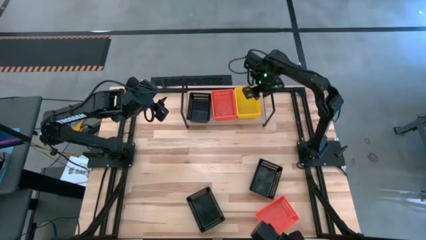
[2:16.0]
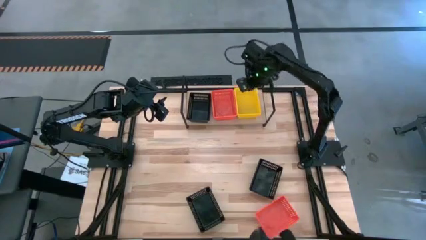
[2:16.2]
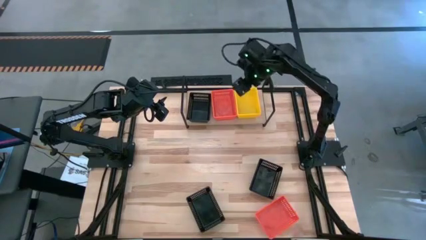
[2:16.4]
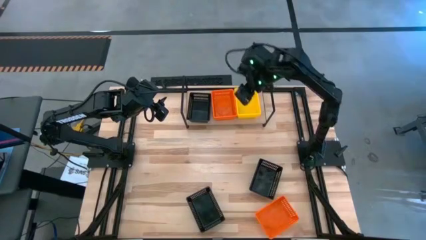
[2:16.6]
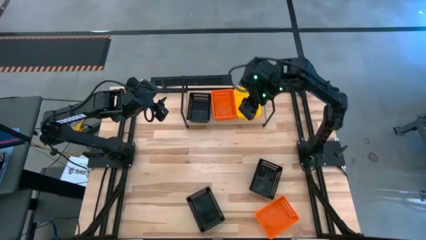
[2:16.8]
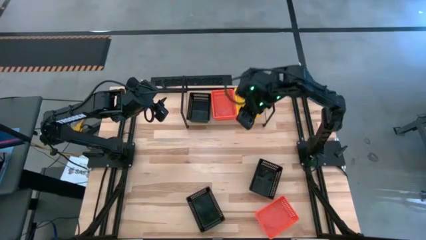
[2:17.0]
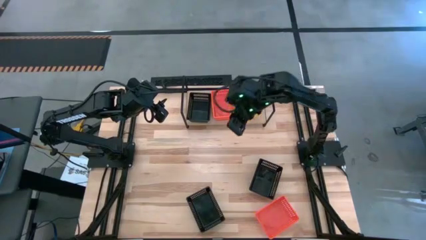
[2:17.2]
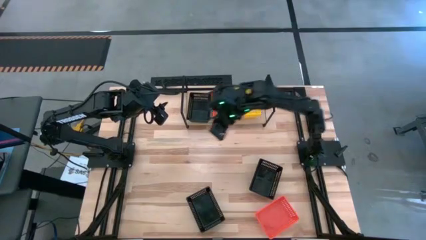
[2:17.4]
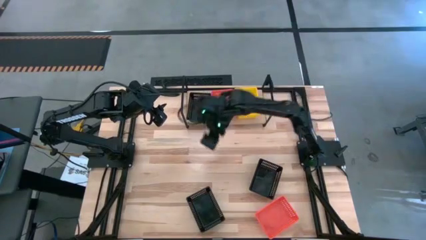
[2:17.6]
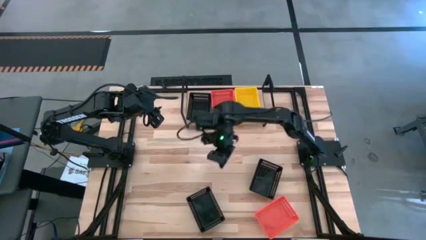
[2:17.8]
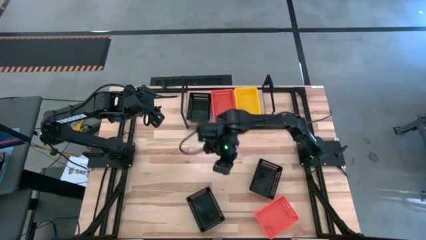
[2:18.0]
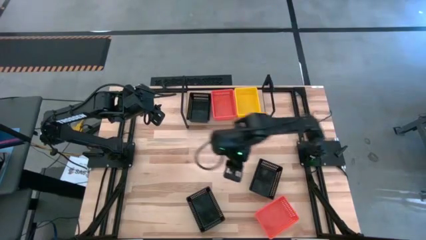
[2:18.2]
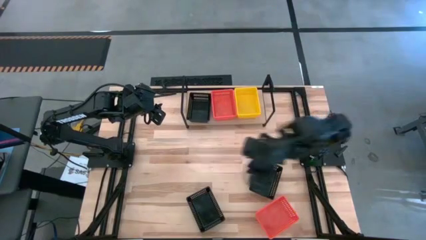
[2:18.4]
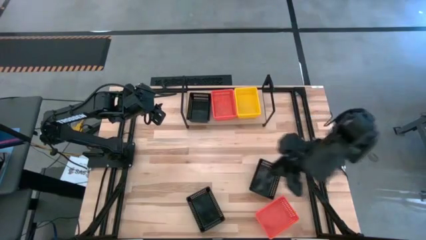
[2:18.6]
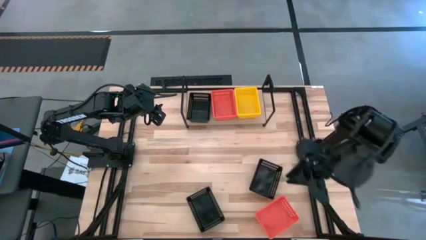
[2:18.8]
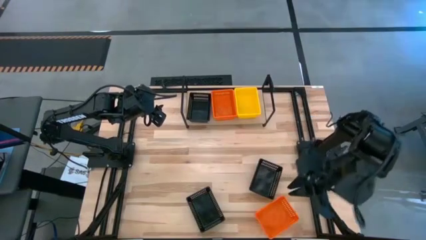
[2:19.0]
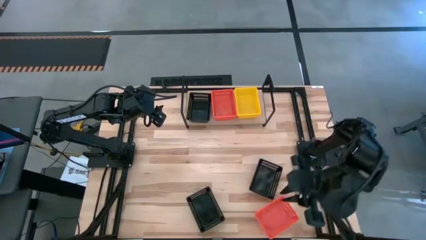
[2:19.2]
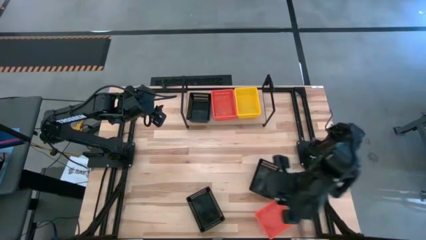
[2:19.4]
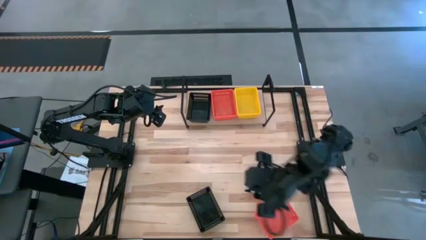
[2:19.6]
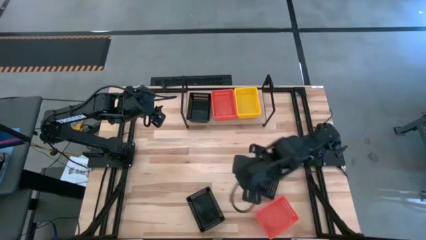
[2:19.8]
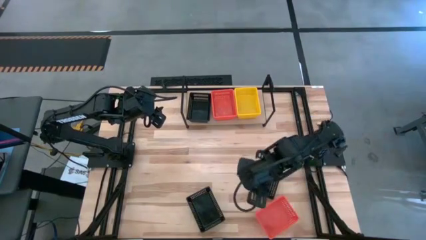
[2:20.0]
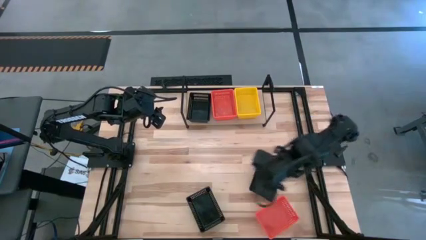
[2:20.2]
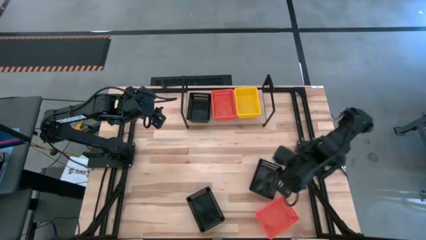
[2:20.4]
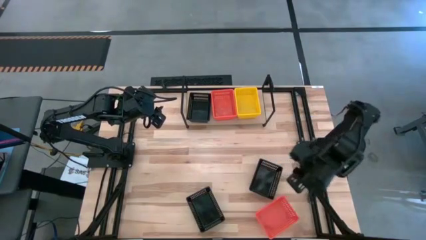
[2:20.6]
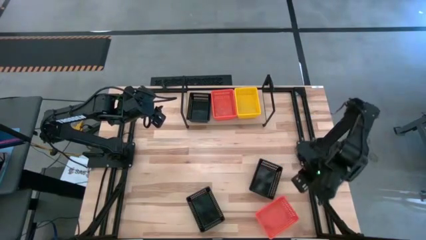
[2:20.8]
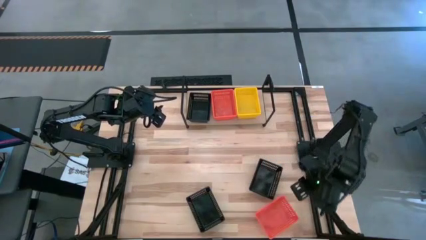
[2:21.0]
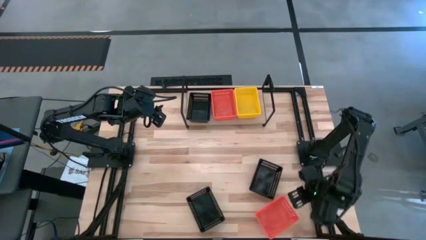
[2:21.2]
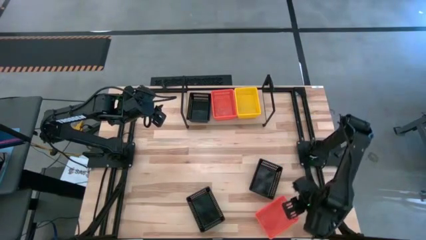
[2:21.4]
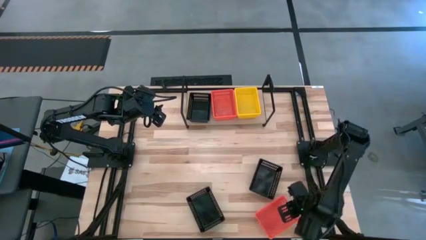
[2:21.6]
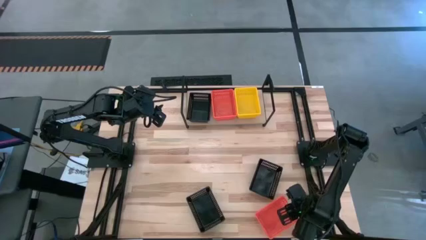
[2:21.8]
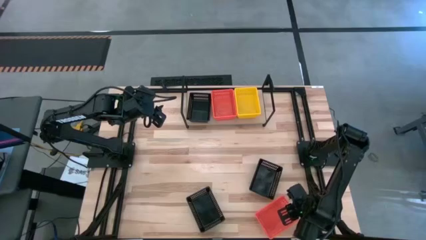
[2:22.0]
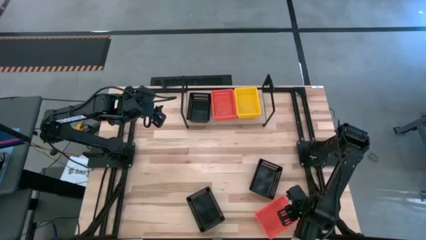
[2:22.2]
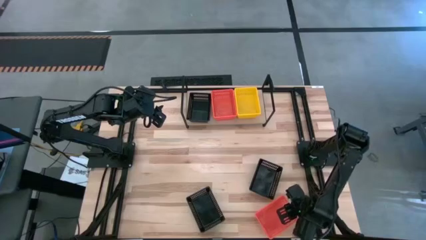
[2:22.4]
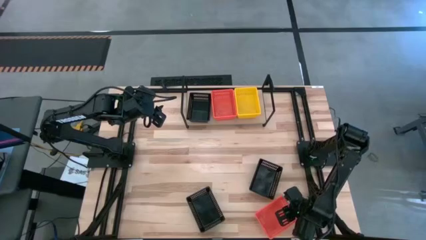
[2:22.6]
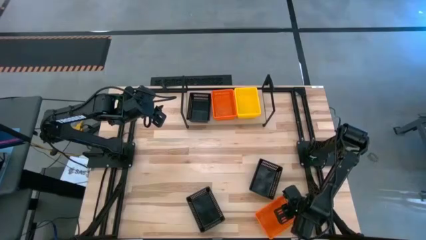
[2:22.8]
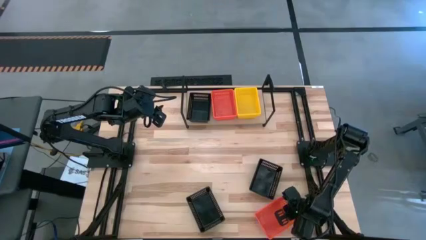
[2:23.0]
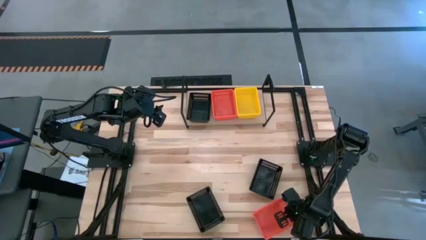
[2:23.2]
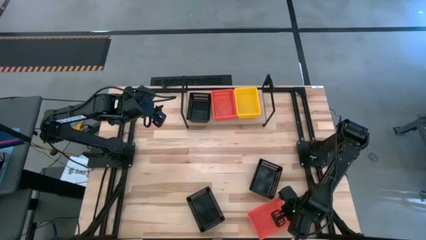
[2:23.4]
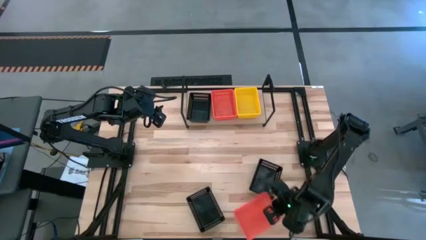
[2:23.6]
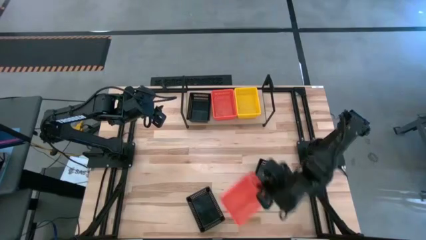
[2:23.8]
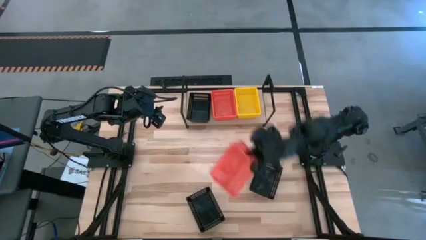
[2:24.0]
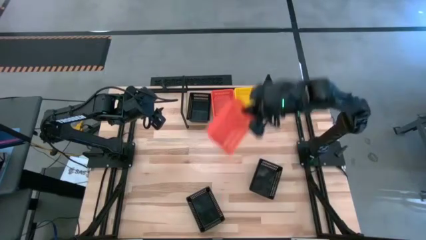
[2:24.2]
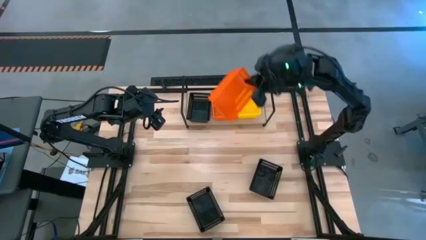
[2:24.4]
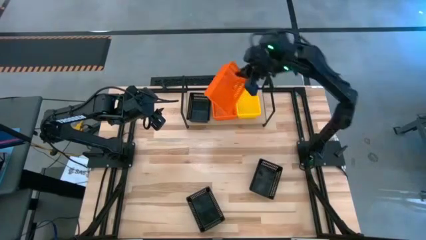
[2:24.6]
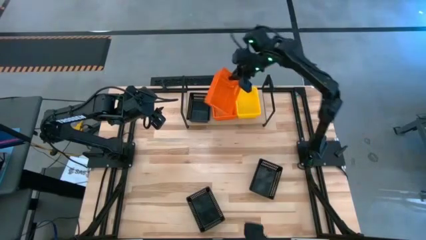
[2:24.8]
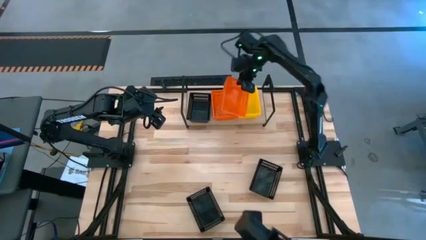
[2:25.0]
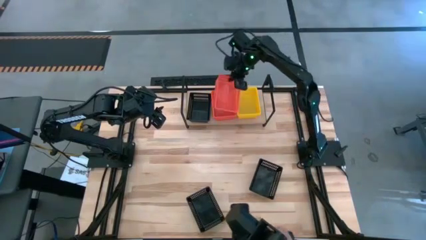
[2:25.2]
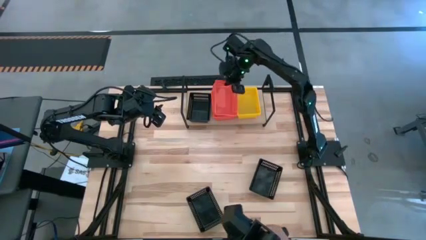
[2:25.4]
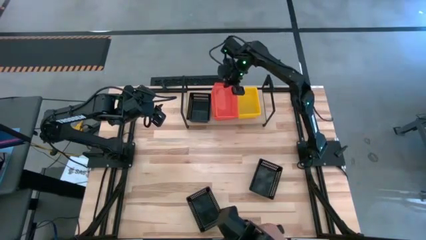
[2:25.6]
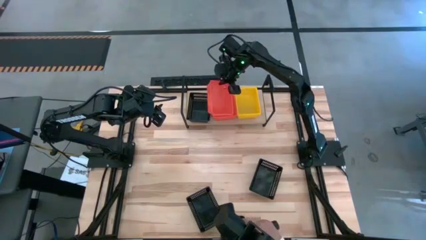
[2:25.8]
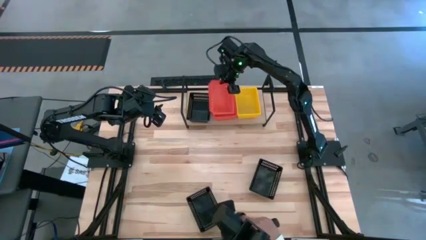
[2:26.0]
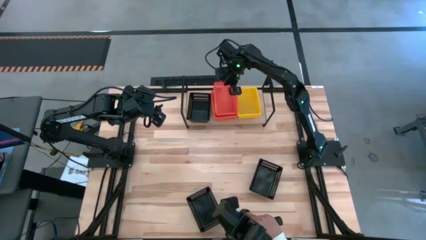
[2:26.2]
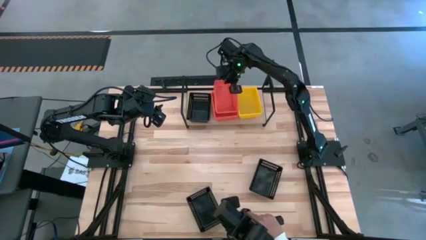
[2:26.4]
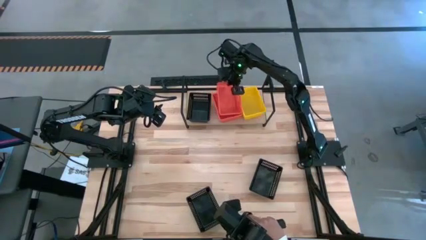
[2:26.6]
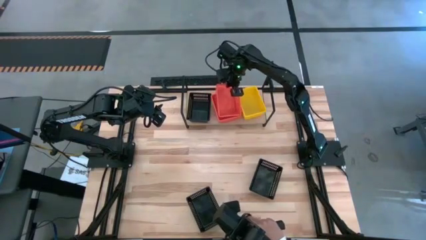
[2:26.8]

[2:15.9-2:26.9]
Task: Stack baskets on shelf by color
Stack the orange bin on top of the other orange bin on the shelf
